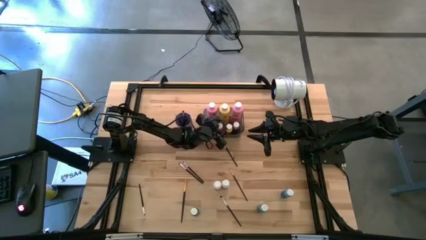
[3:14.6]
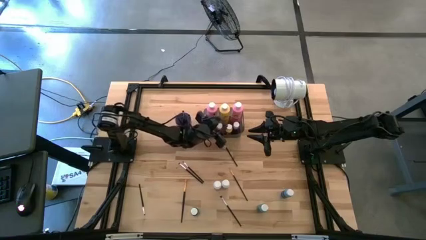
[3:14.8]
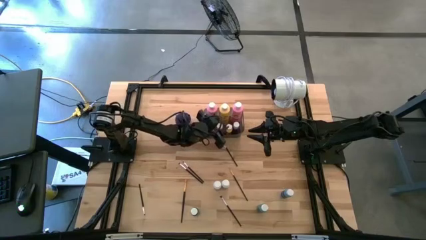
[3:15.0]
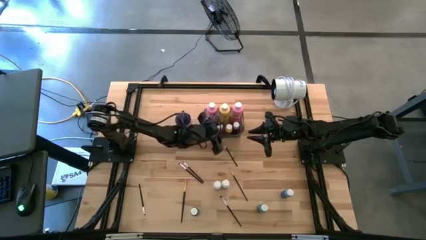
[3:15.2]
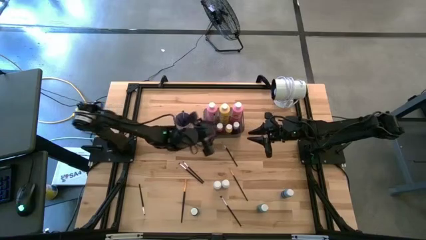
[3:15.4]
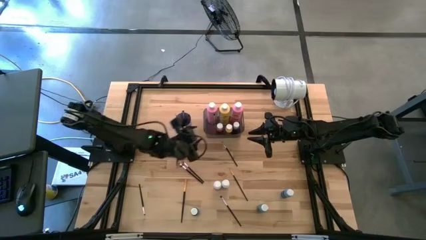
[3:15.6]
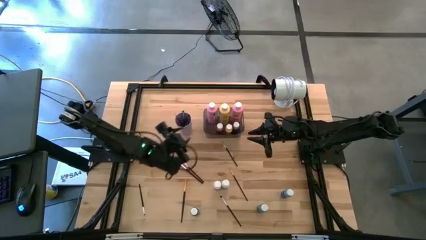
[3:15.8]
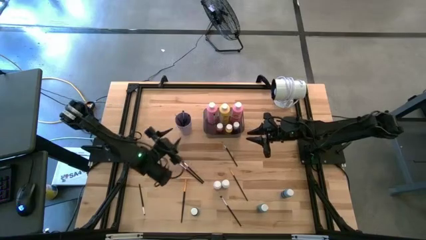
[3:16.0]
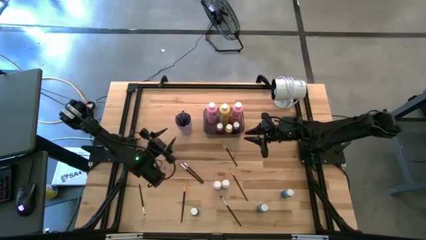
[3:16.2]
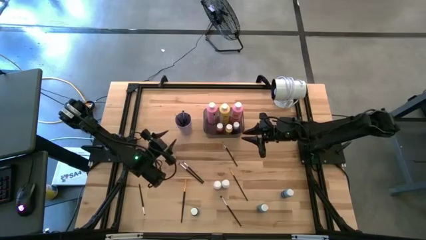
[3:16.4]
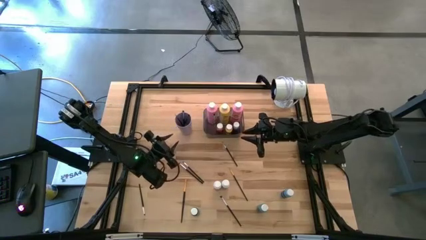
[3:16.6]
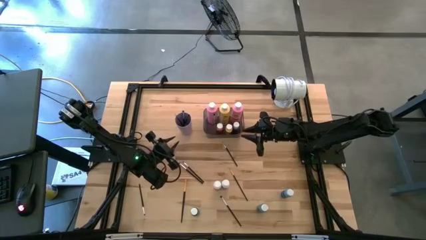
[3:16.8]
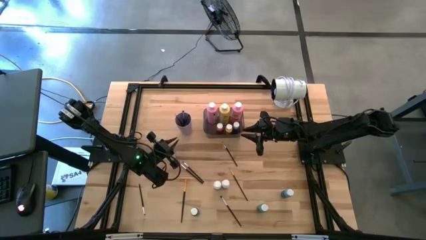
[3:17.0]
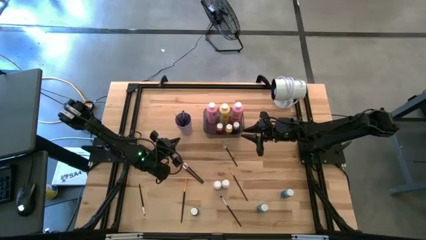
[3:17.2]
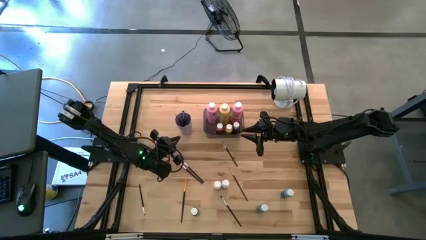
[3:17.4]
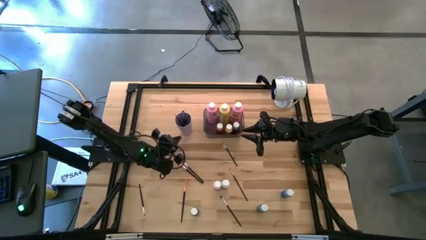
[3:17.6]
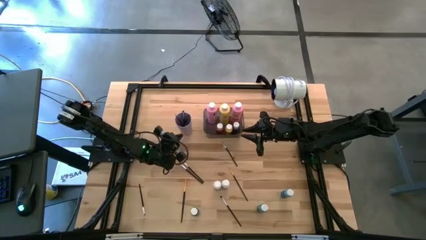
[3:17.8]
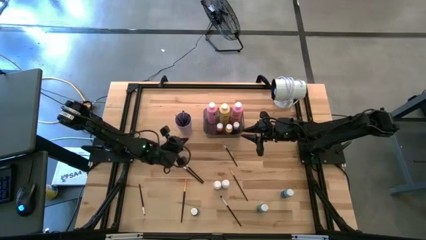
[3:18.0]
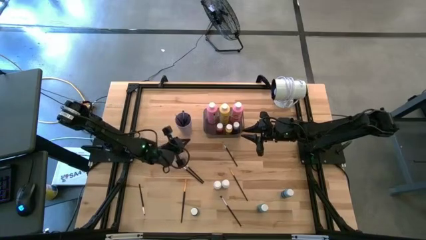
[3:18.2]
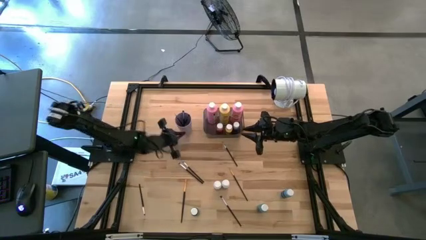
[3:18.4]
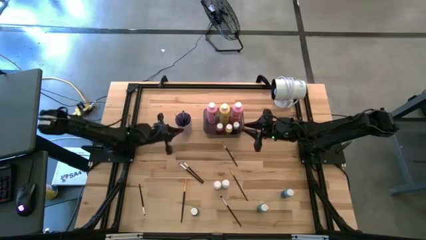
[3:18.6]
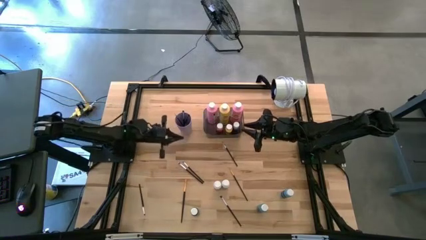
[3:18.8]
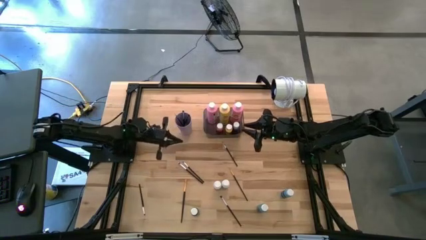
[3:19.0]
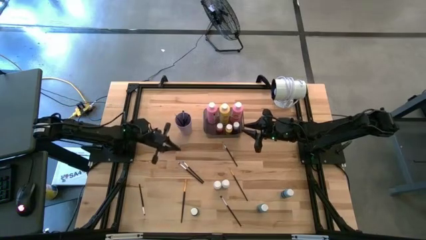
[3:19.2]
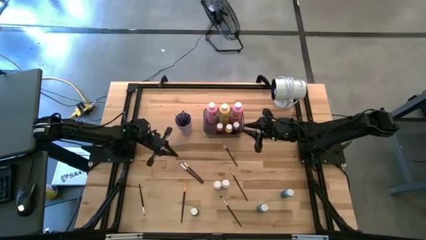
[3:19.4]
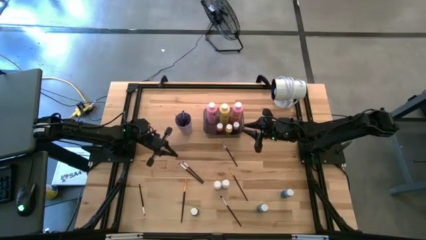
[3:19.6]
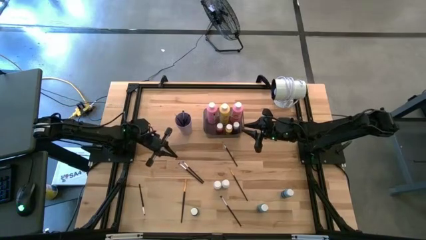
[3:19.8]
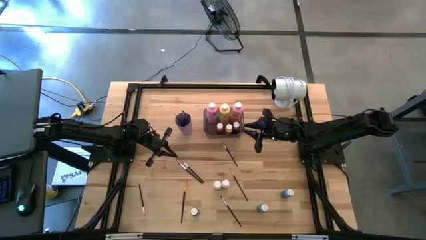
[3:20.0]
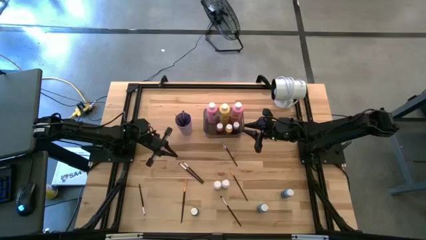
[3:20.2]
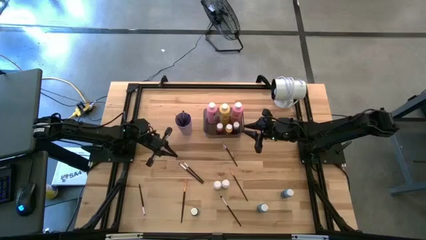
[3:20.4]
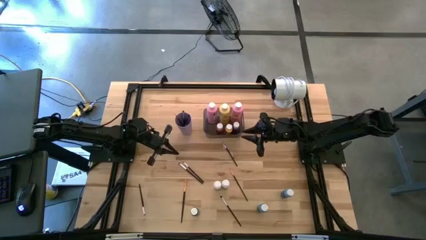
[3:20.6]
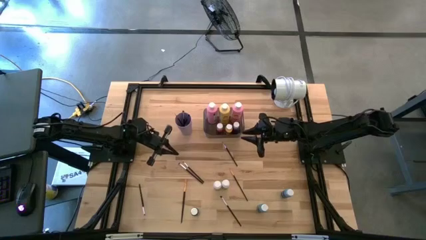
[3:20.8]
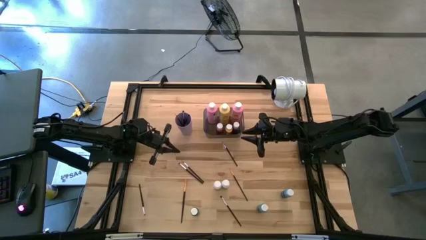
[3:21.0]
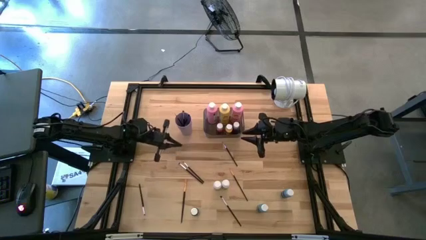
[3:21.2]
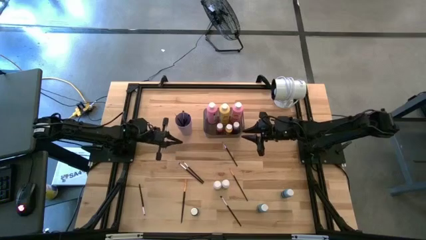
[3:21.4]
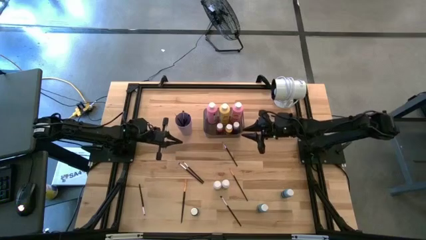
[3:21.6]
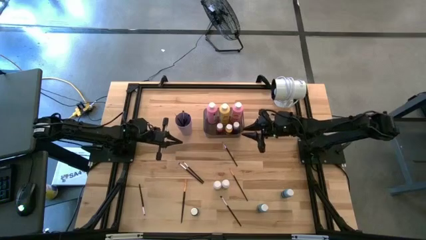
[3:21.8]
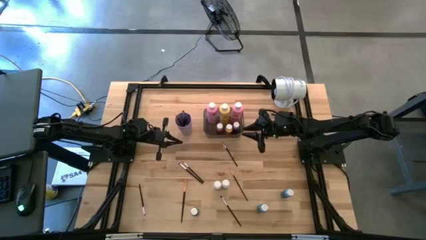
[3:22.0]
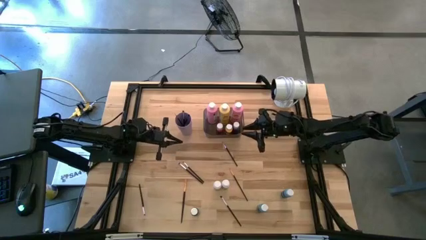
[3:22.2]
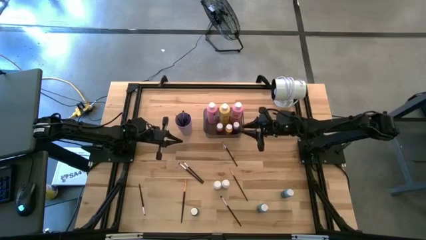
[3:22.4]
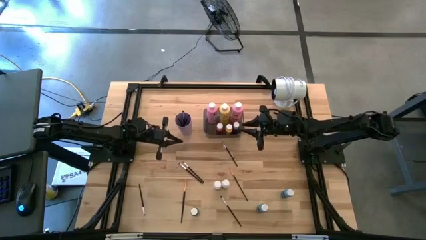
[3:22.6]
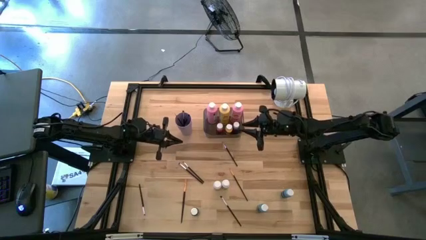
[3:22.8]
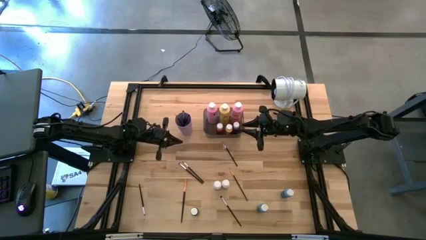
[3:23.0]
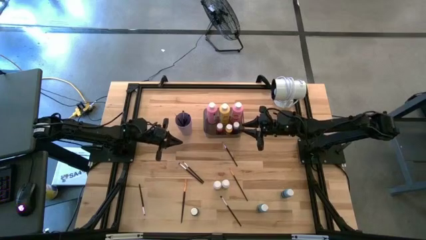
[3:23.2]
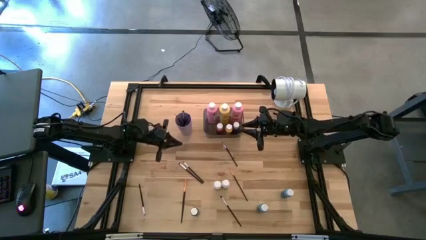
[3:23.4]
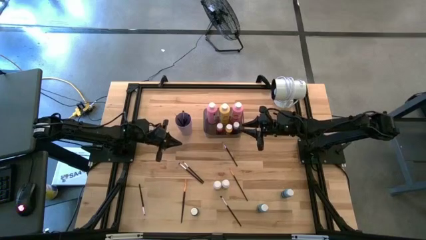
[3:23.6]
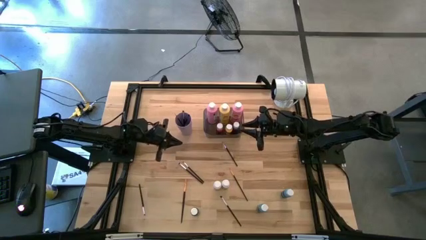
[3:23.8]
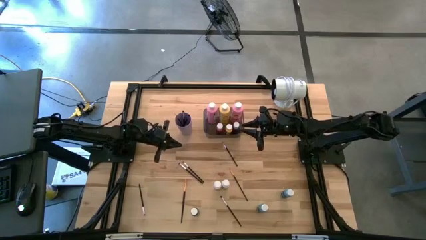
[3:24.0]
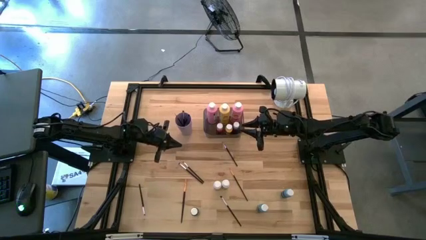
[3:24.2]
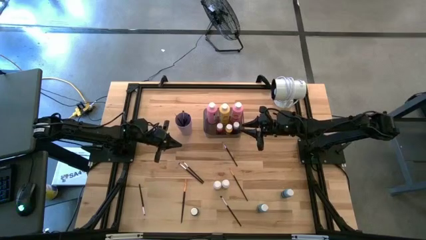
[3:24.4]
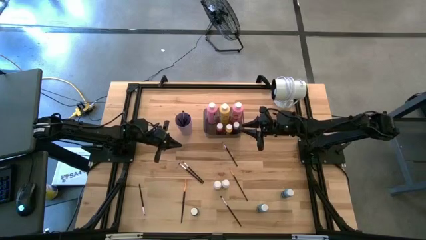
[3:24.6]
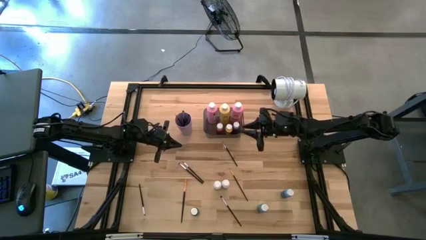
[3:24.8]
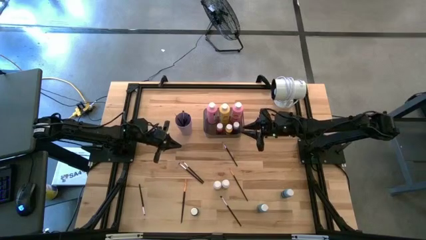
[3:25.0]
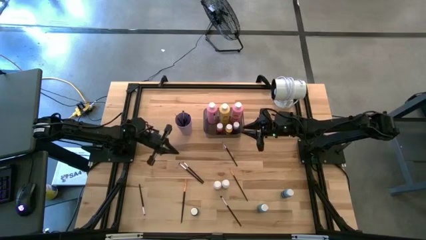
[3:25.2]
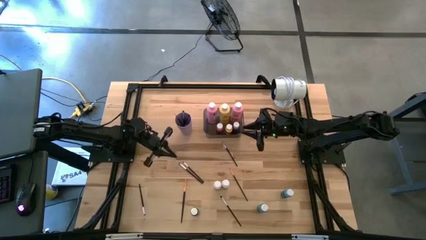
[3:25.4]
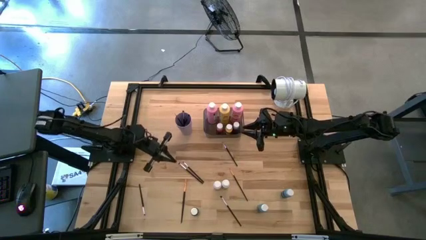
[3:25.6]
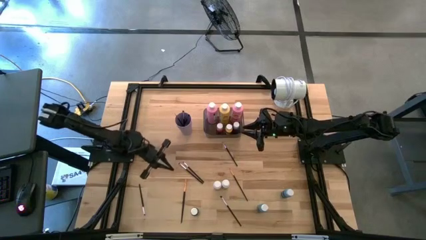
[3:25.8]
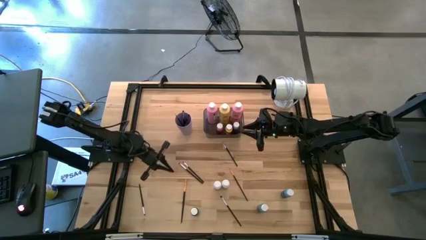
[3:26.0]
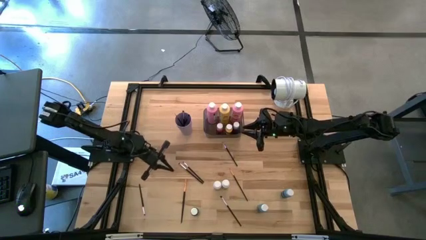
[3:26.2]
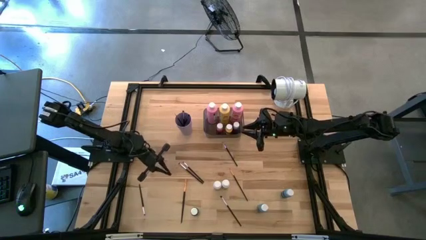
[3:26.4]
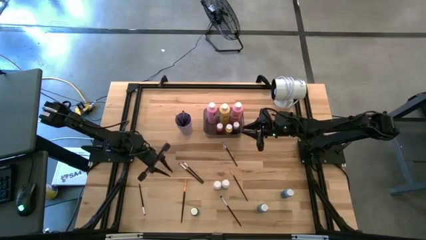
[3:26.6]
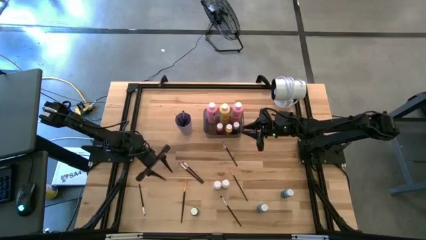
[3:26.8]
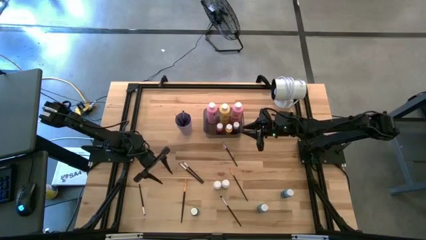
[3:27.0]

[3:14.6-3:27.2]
Task: Pick & Place Paint Supplies
Put the small green paint bottle into the gray bin

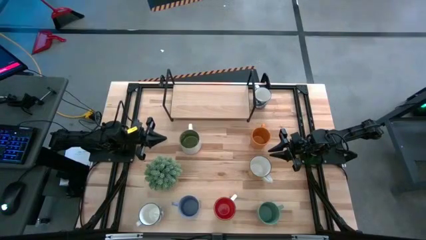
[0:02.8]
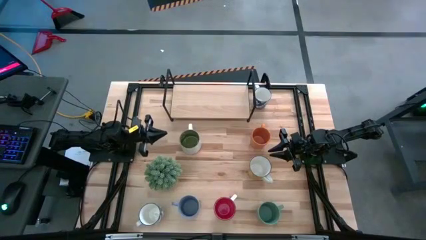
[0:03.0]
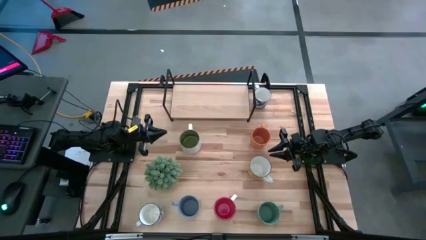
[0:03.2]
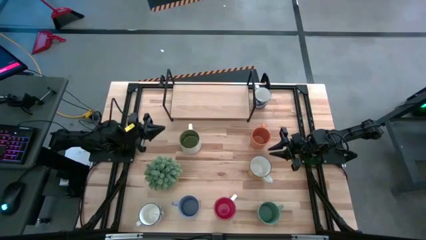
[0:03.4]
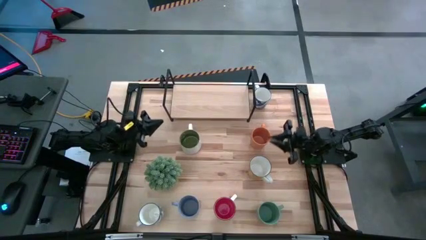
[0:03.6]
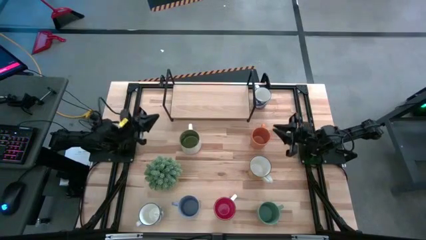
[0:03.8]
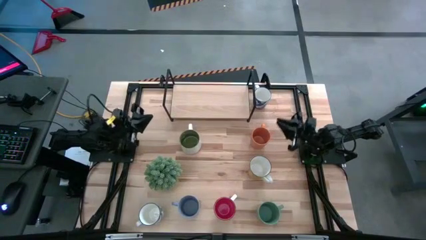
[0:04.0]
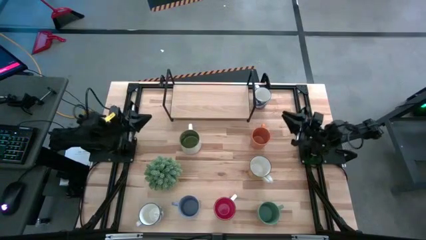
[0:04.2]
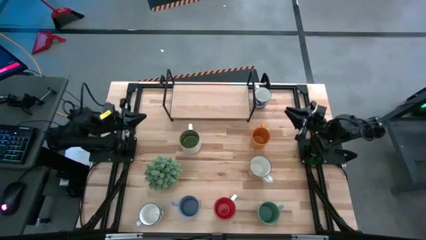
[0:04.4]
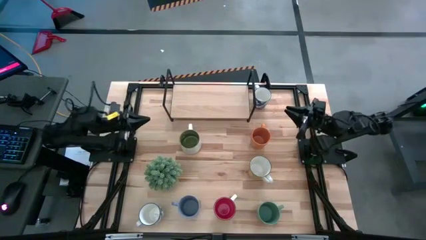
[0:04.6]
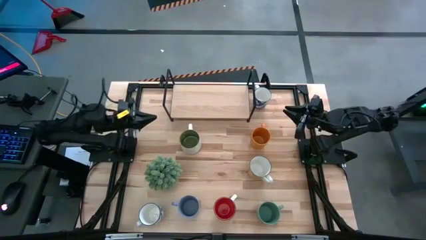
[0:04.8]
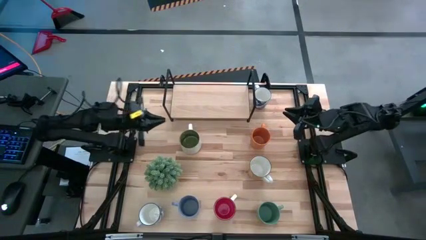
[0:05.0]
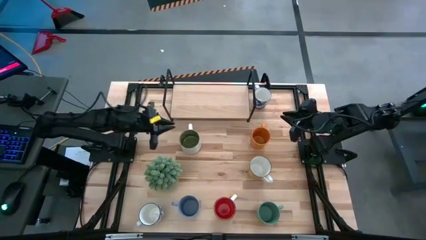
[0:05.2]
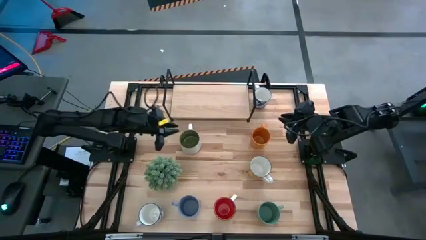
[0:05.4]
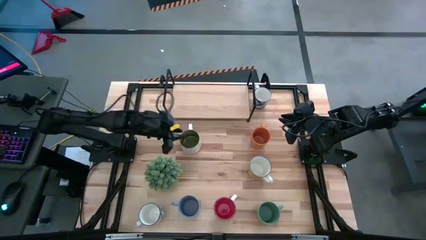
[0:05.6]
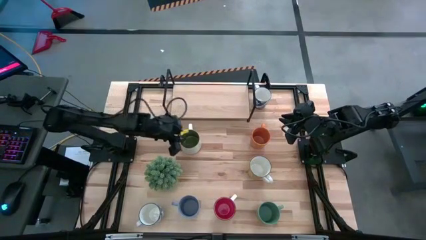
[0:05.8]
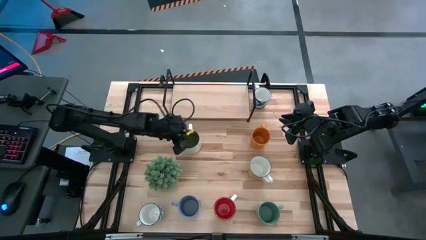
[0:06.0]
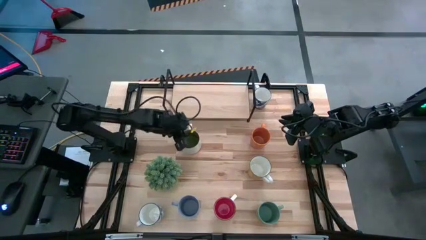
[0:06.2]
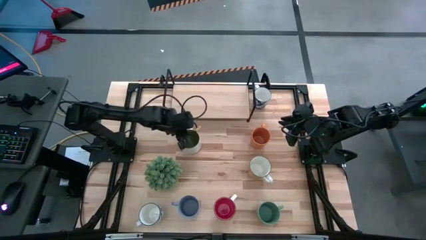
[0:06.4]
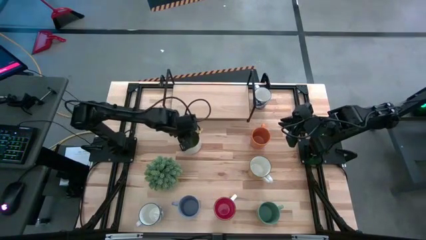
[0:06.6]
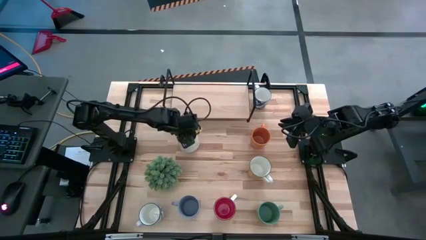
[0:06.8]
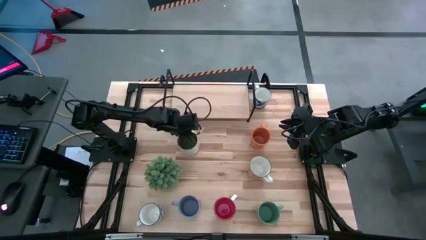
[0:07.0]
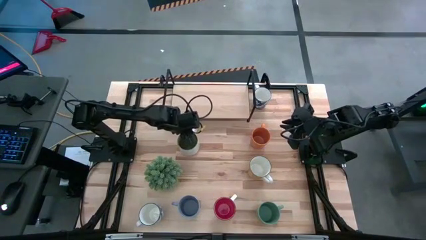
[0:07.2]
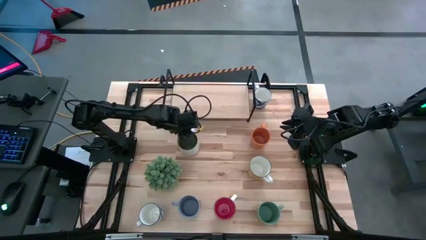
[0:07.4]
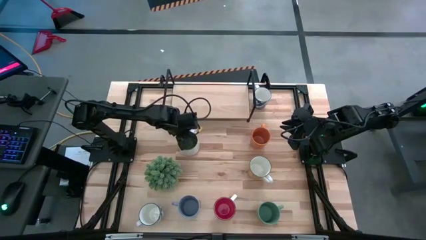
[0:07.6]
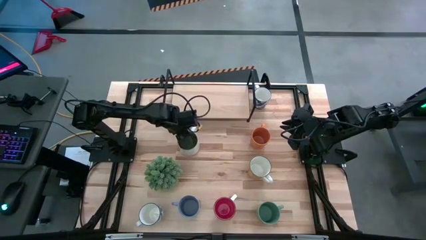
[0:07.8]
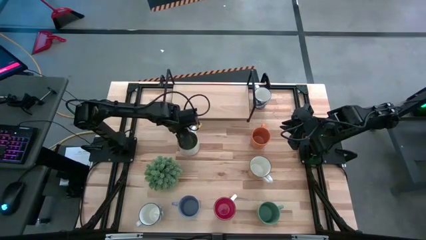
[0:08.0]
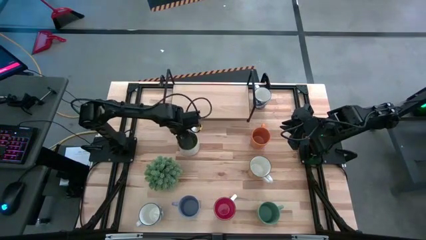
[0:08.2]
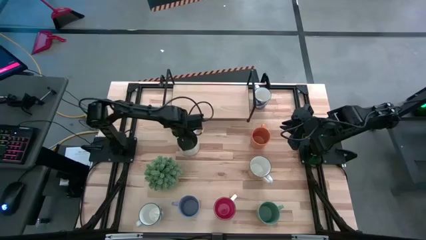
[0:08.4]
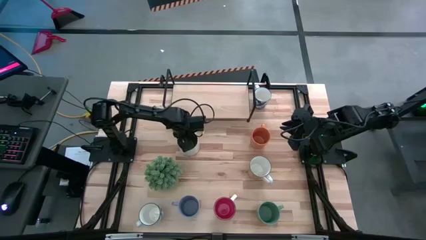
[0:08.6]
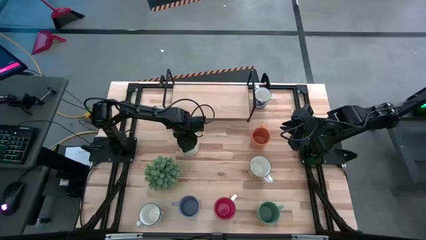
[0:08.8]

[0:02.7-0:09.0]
Task: Place coffee mugs
Put the white mug on the shelf
